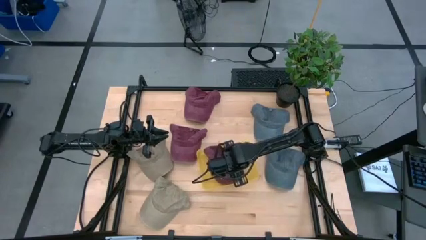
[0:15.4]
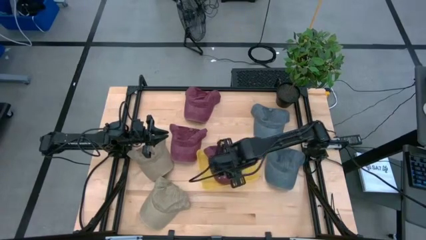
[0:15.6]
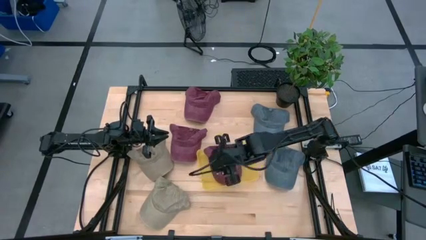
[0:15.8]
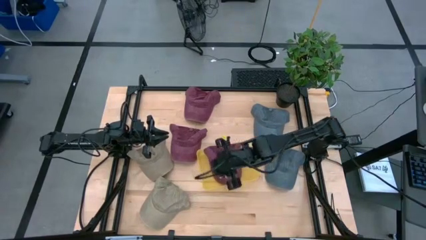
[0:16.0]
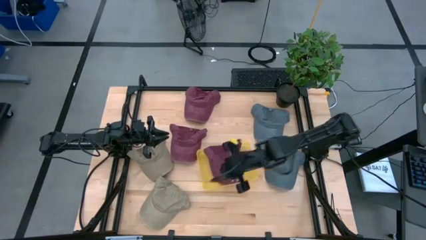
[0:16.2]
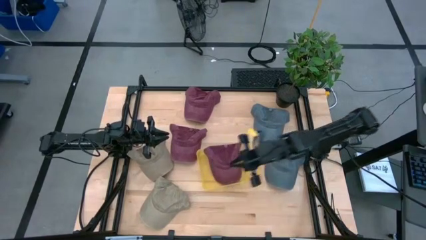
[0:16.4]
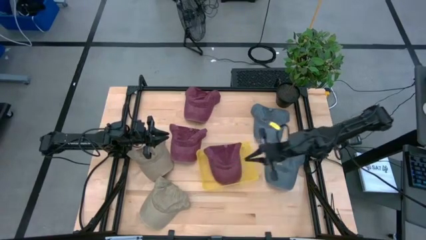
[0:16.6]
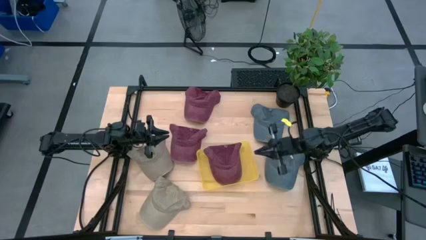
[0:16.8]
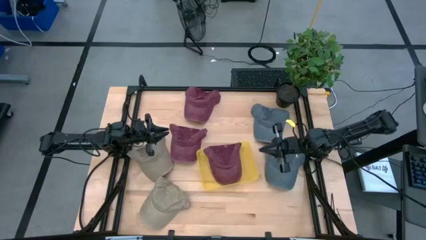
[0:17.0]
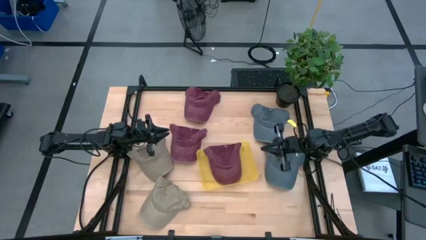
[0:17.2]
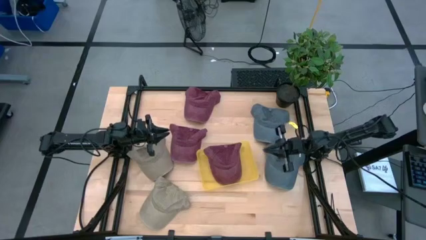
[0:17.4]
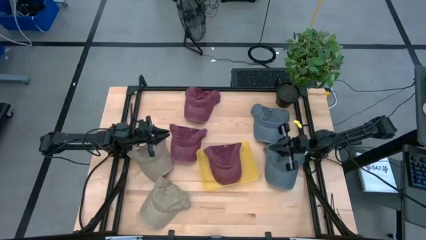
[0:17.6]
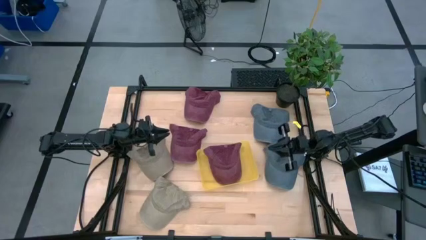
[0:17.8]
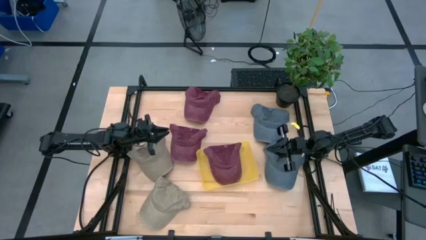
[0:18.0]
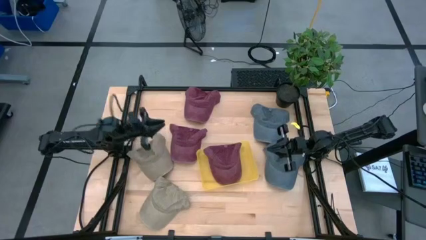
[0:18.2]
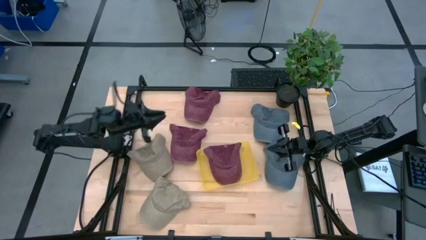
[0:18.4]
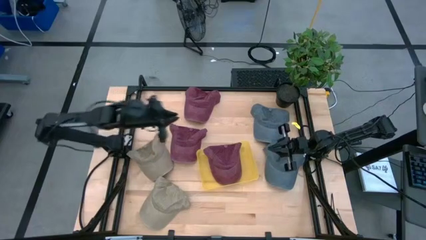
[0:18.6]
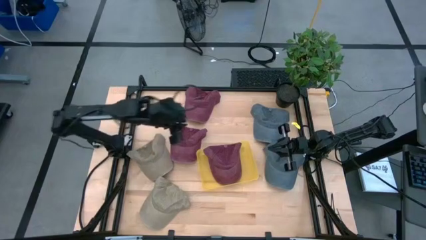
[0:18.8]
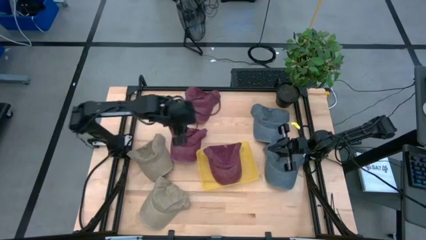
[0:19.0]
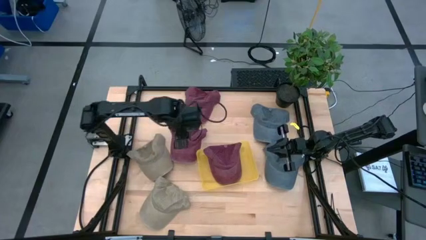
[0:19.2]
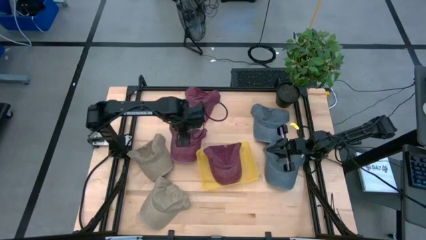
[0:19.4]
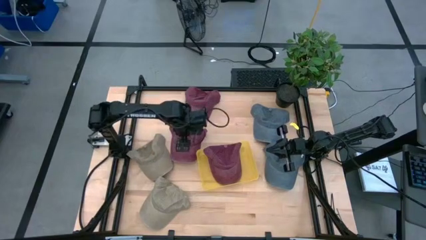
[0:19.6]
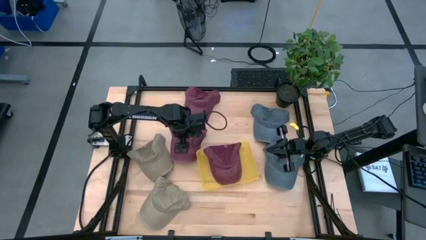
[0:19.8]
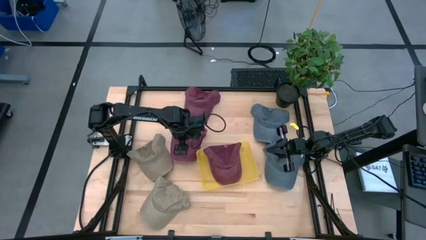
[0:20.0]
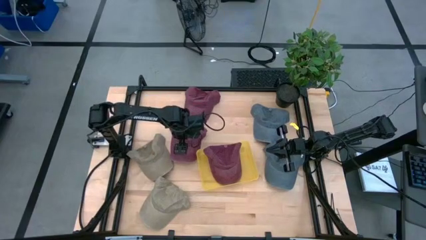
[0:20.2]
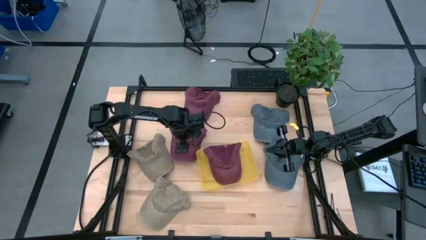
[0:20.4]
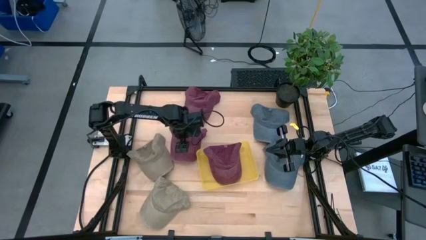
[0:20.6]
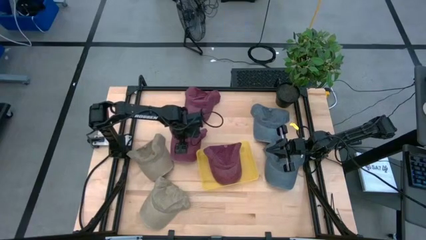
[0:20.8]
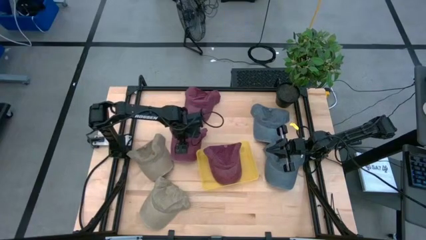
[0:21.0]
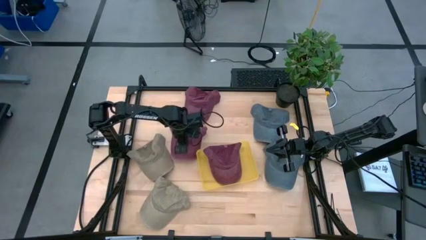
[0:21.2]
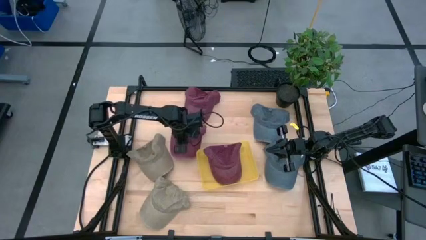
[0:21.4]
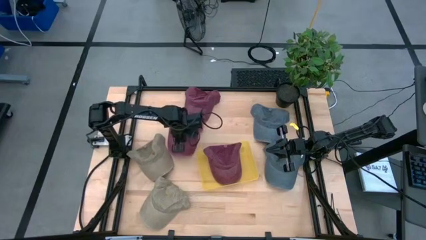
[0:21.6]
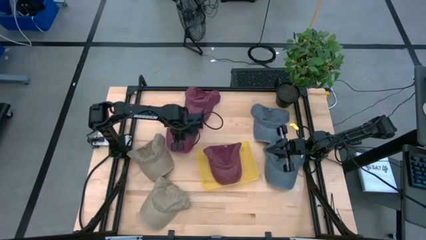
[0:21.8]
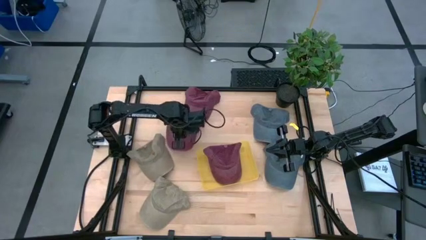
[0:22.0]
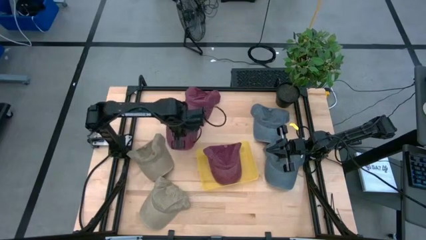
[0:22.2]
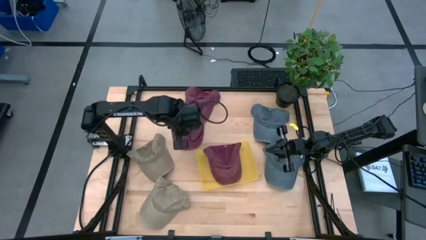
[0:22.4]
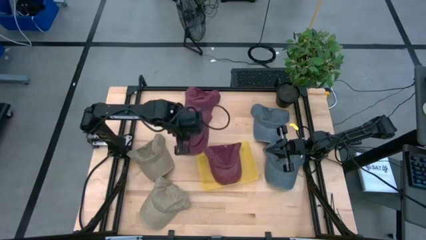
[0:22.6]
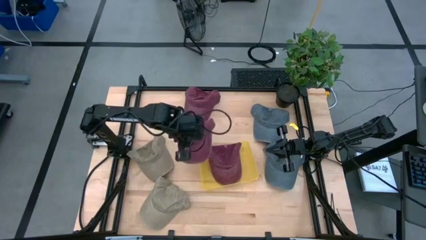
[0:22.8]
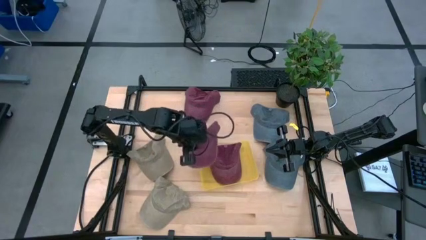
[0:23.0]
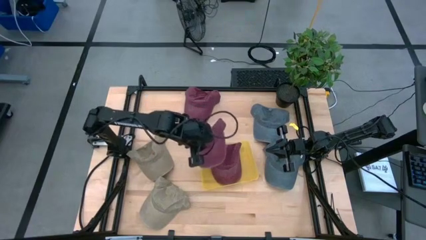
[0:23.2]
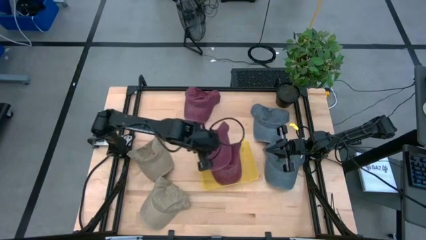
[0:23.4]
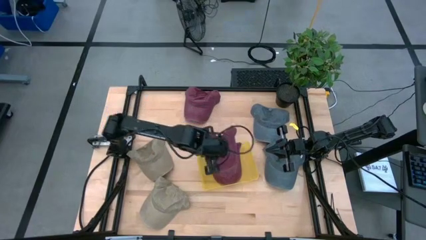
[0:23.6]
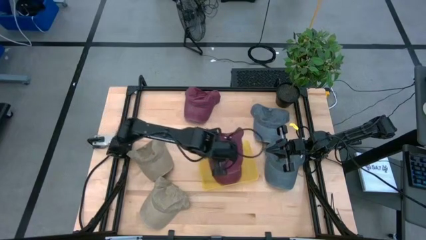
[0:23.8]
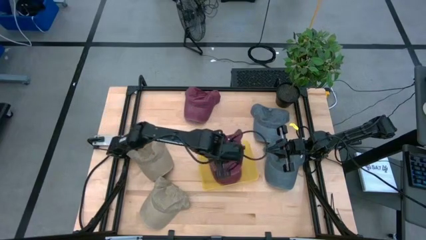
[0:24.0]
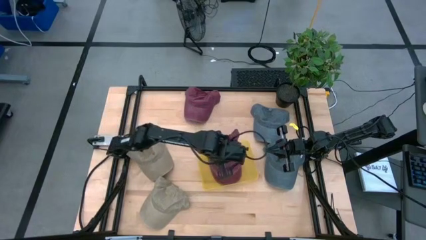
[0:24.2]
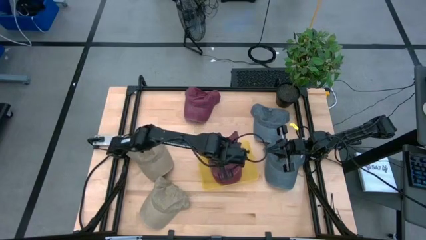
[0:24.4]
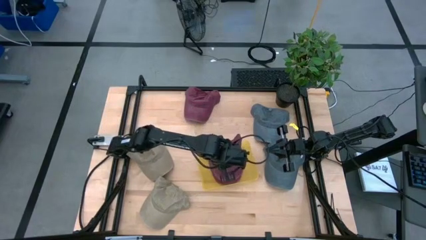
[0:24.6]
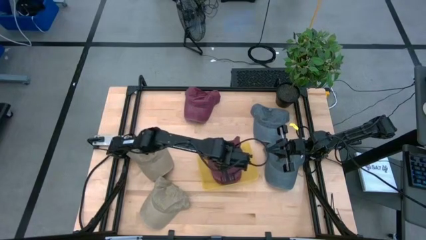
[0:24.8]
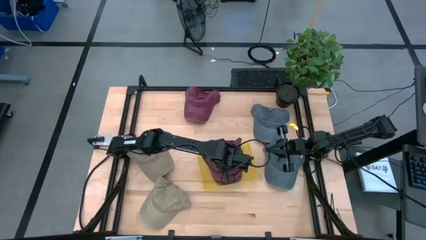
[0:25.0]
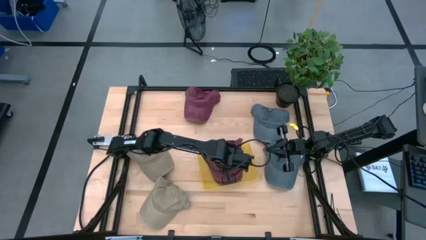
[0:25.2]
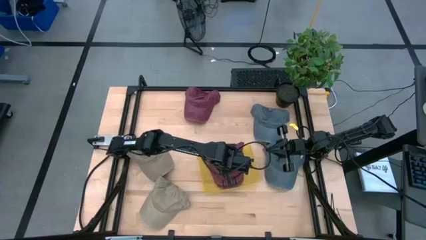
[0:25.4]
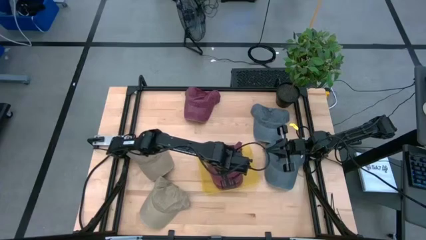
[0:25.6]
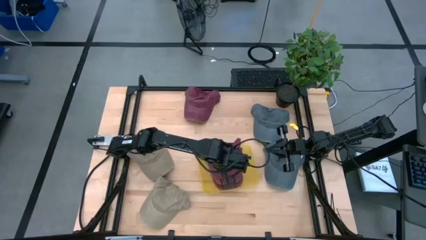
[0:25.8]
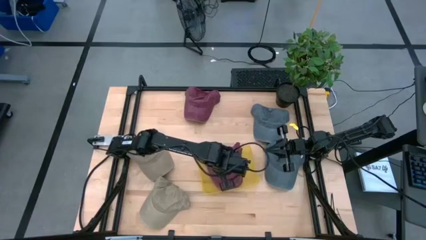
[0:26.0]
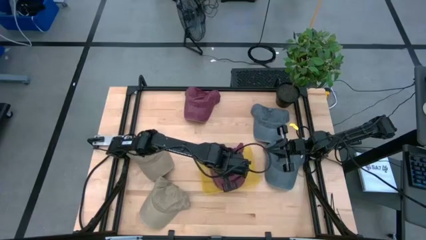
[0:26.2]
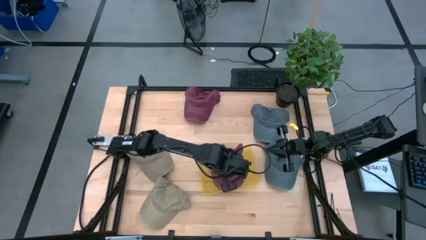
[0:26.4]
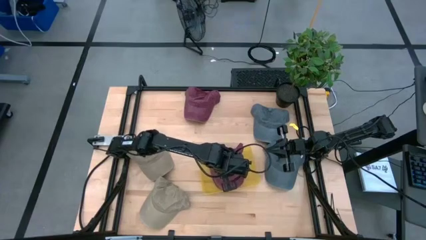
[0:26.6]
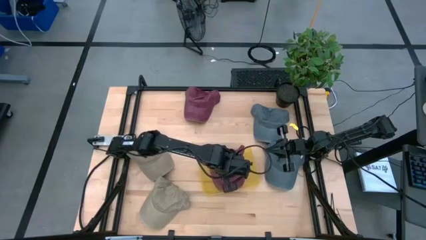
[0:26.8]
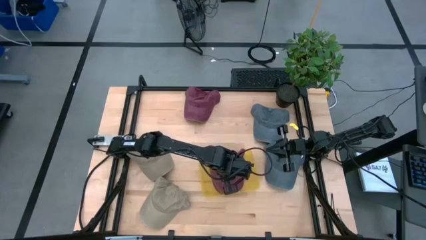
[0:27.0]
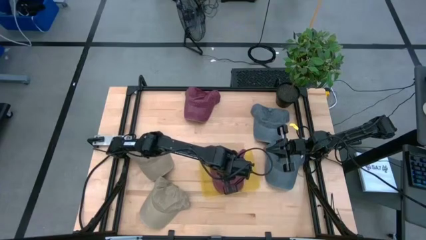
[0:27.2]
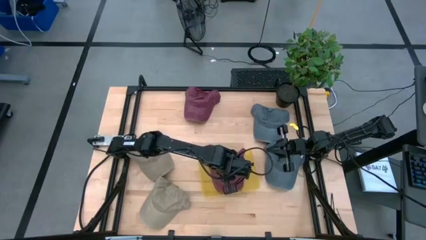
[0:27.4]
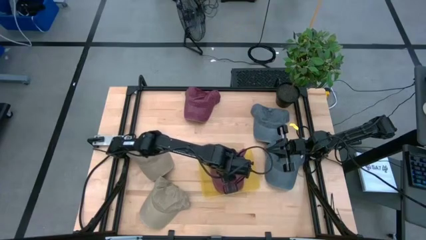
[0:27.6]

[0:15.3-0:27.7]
Task: Pick and place caps into container
Put the bottom violet cap into the yellow container

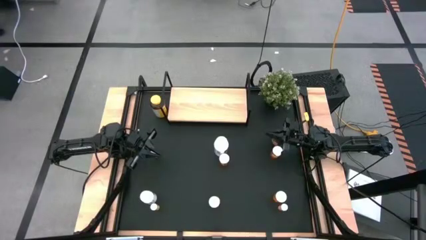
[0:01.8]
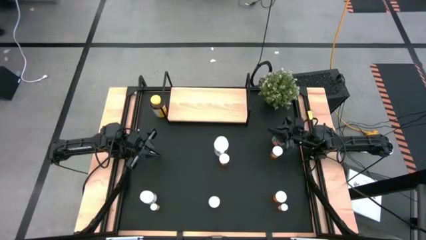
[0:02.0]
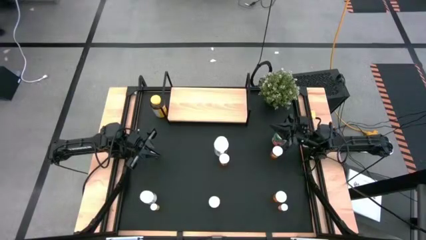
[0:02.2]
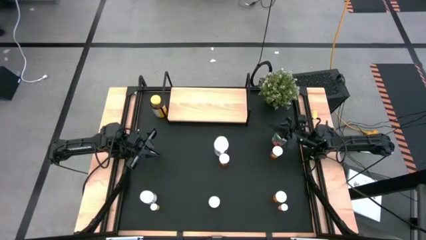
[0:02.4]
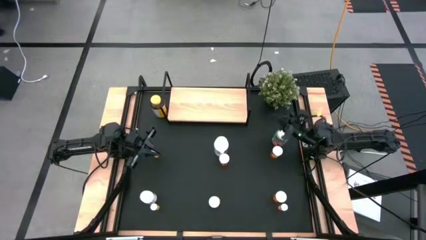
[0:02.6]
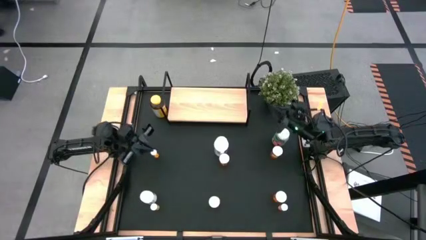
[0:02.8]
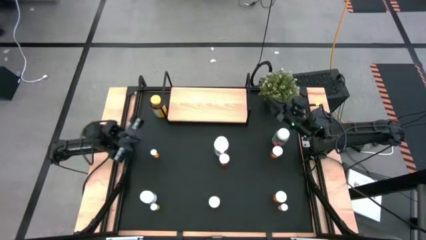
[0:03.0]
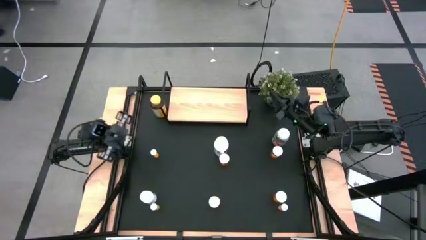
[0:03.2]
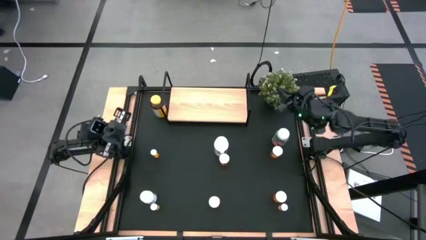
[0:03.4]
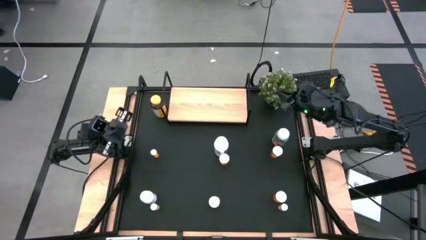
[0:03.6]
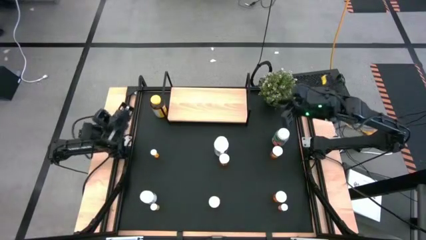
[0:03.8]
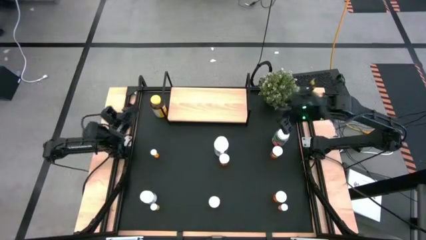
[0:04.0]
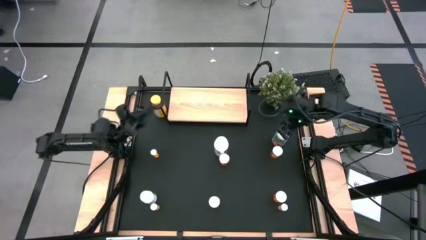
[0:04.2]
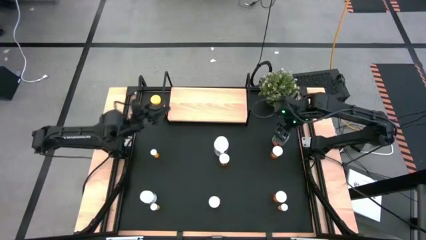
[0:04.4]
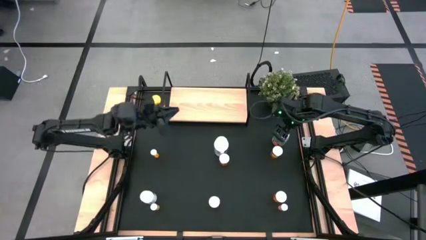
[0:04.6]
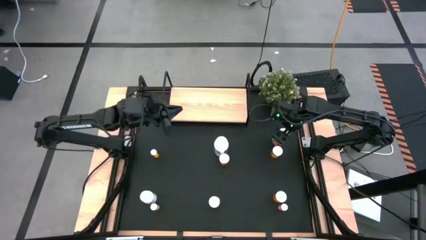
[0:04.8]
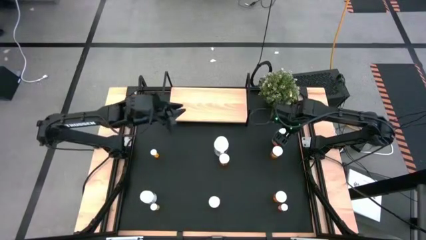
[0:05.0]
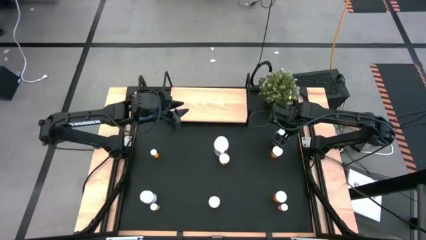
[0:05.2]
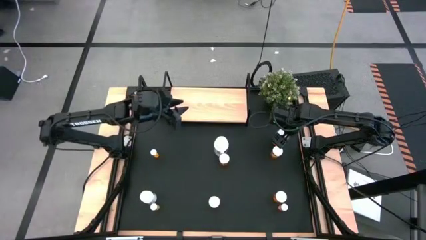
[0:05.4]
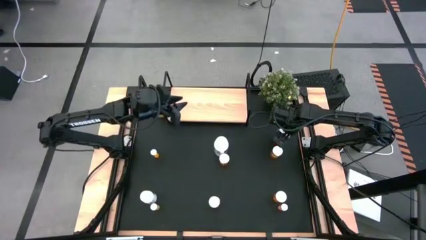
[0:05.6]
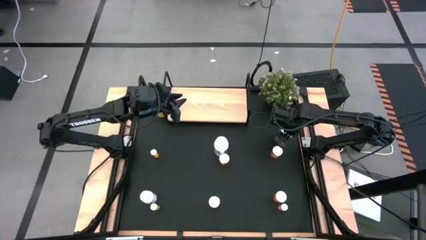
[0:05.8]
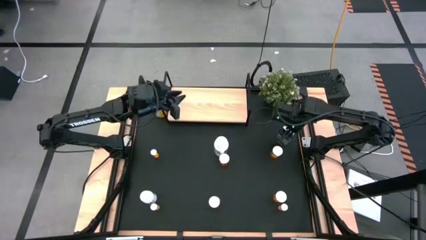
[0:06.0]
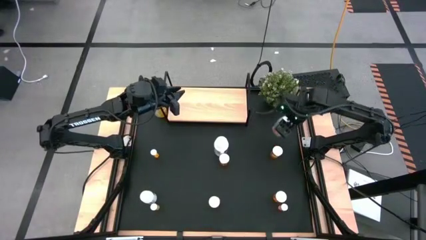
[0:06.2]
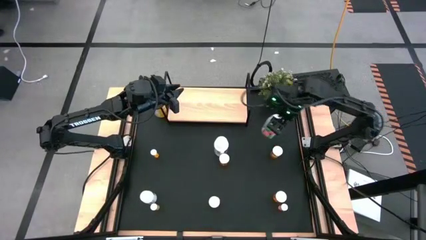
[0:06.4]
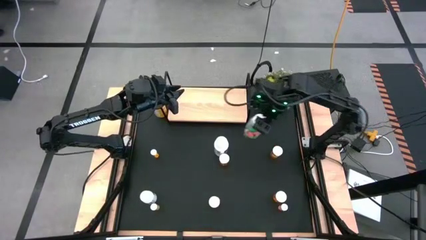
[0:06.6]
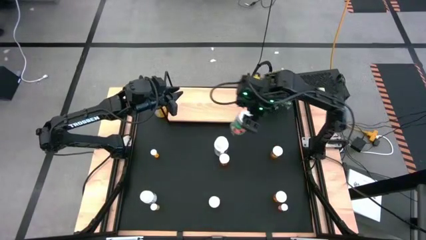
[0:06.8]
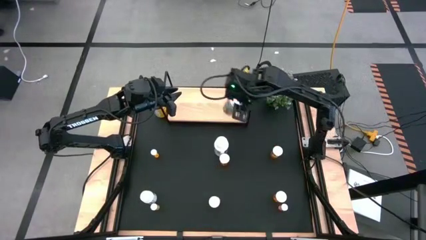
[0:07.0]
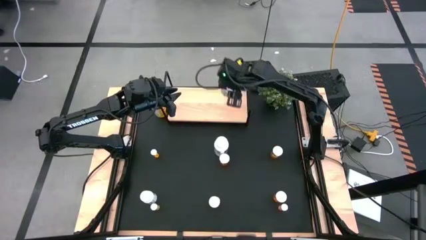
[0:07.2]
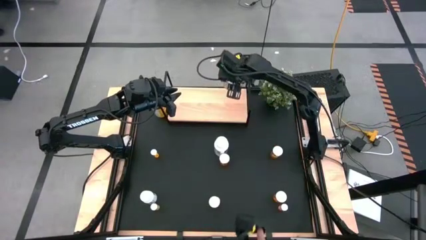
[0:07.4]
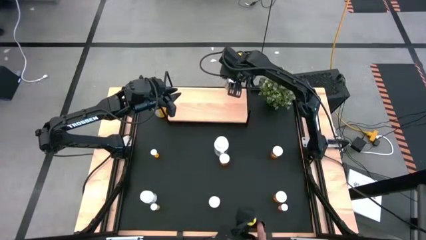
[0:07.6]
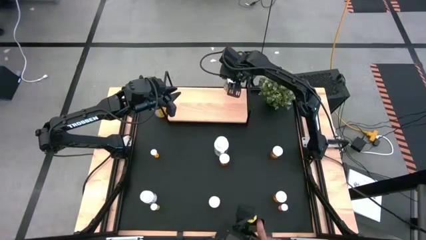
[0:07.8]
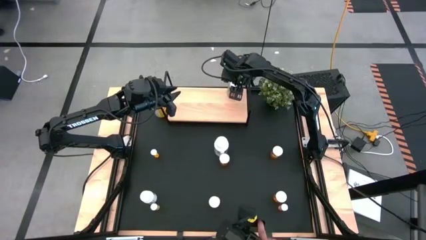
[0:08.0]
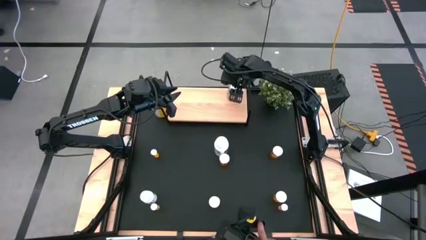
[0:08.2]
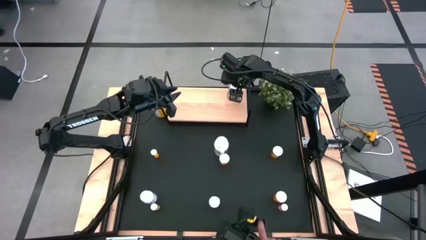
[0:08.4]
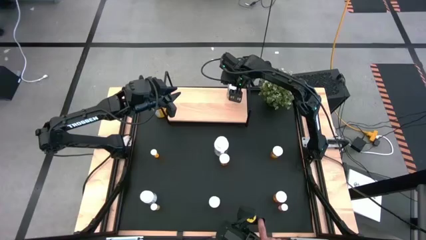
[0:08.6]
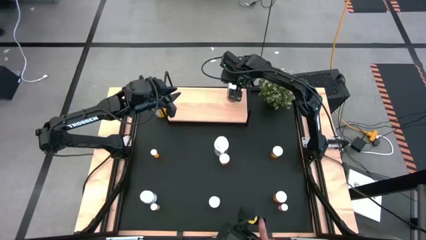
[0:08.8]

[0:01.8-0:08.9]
Task: Pick and place medicine bottles onto shelf by color
Put the green pill bottle on the shelf
